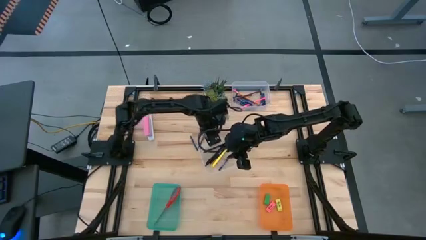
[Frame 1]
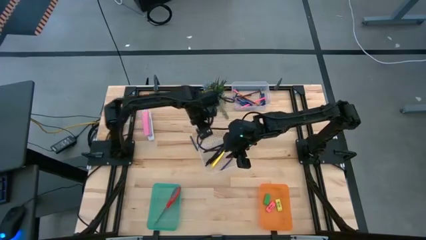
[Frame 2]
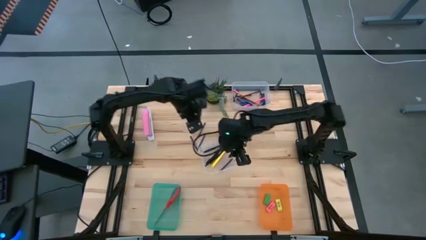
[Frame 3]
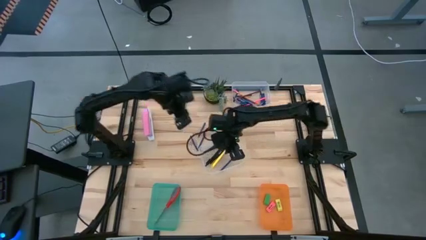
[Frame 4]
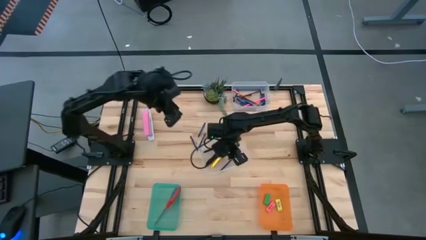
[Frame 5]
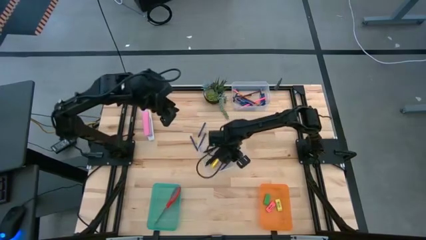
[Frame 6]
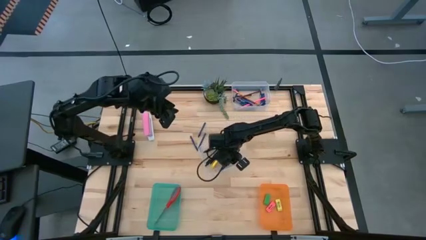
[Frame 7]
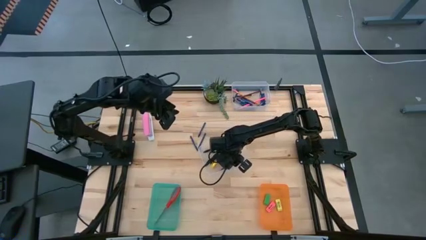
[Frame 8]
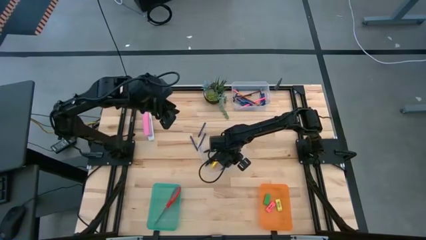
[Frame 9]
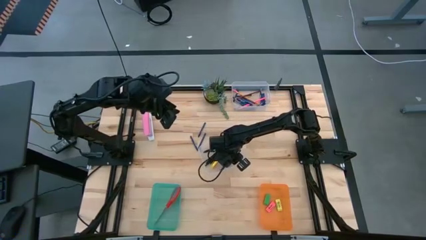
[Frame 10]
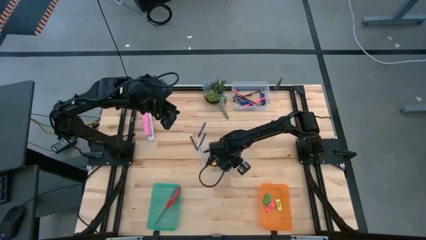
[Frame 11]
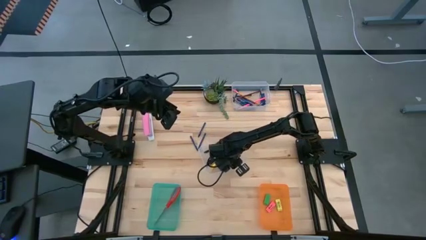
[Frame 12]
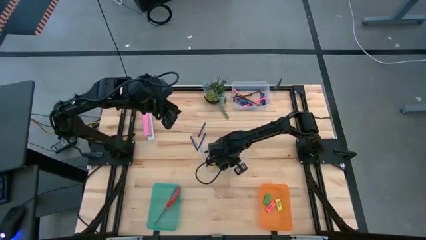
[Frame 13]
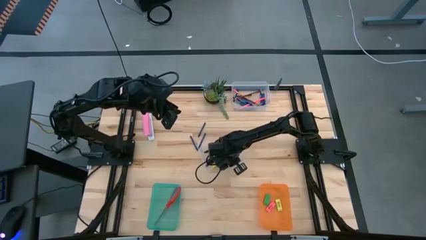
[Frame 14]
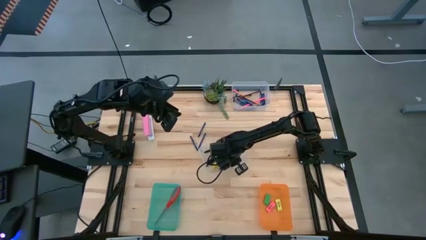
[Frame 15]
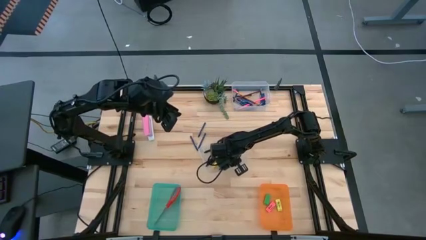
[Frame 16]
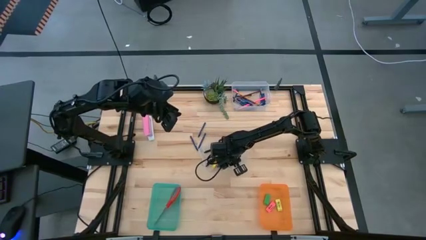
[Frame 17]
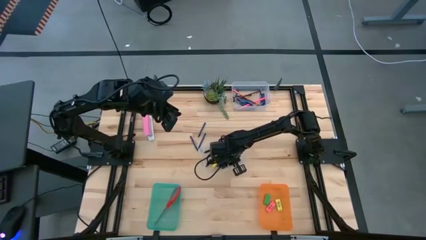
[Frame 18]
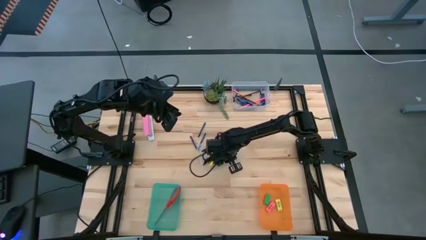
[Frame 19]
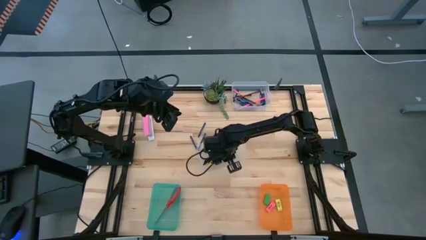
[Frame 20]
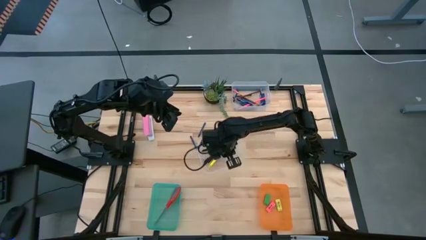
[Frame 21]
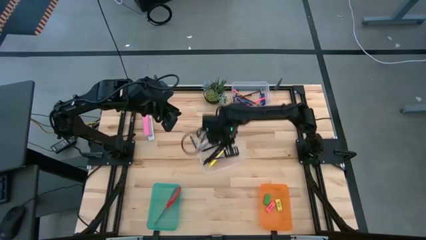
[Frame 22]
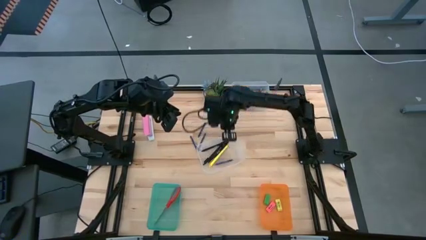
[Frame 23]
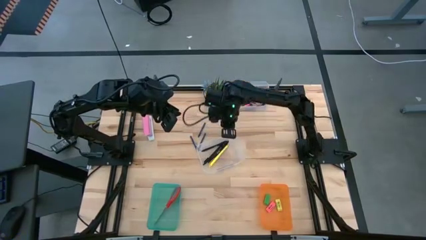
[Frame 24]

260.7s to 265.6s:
Task: Sort crayons/erasers/pens/pencils in bins
Put the blue crayon into the right transparent bin

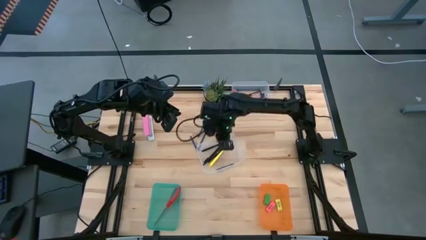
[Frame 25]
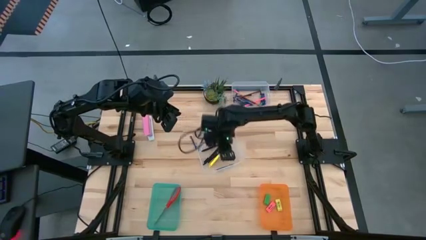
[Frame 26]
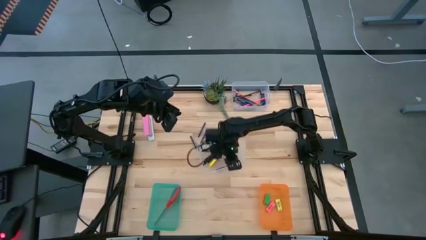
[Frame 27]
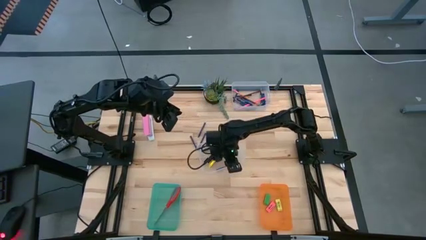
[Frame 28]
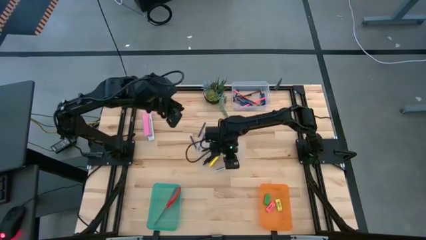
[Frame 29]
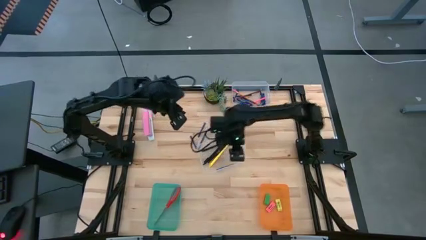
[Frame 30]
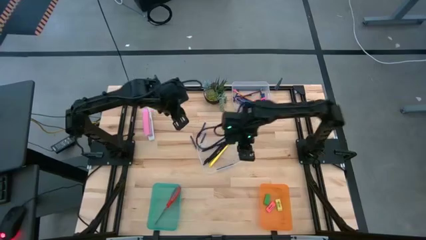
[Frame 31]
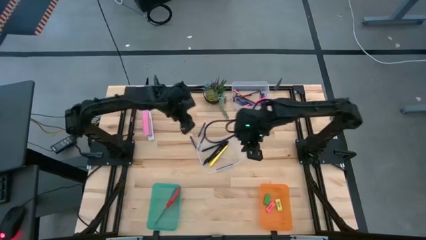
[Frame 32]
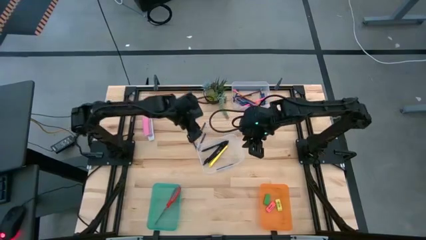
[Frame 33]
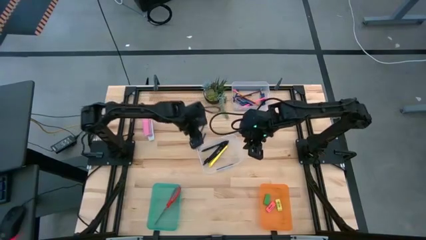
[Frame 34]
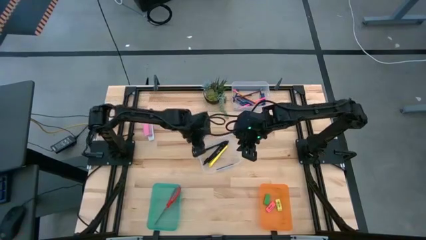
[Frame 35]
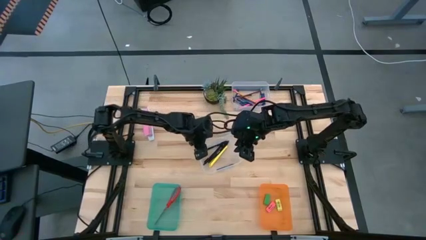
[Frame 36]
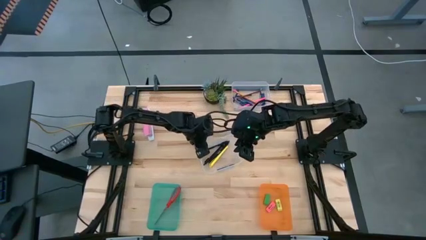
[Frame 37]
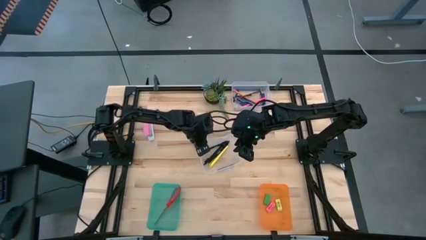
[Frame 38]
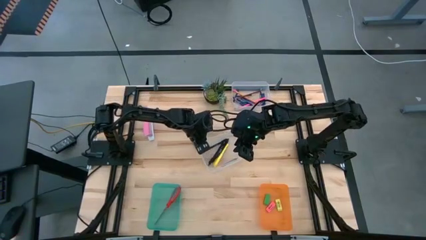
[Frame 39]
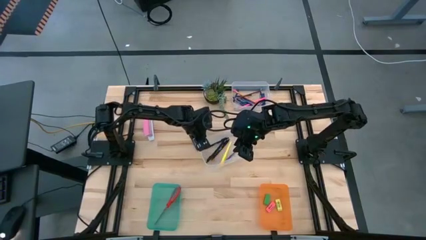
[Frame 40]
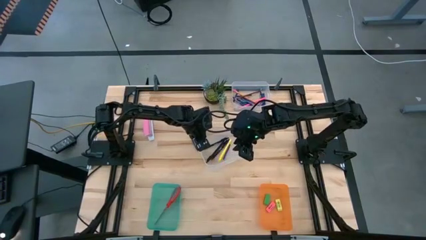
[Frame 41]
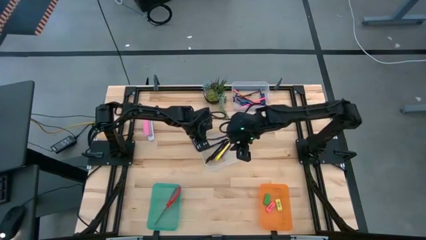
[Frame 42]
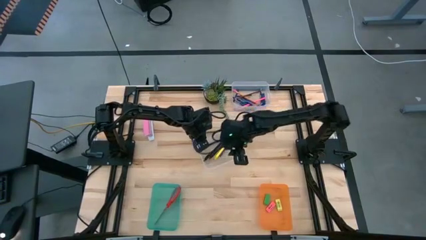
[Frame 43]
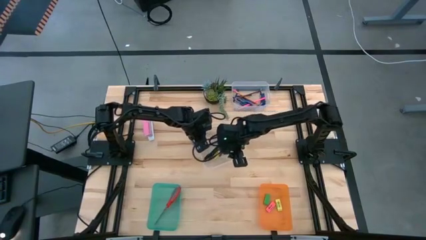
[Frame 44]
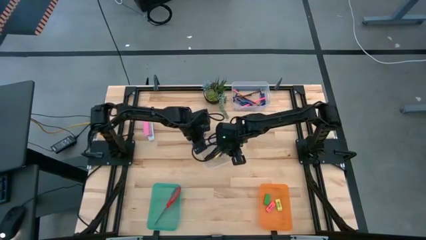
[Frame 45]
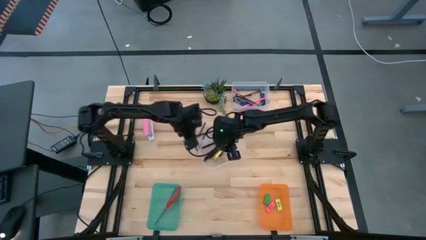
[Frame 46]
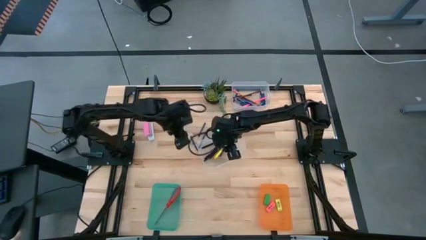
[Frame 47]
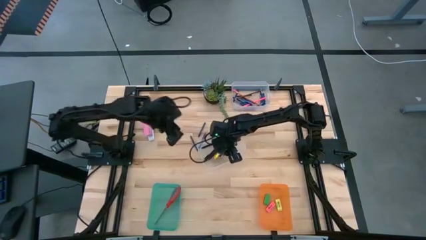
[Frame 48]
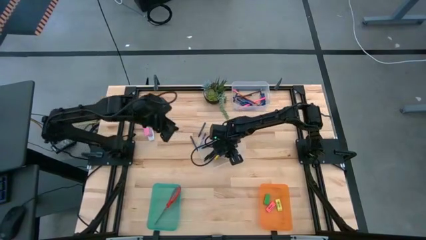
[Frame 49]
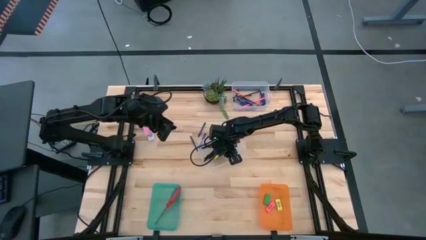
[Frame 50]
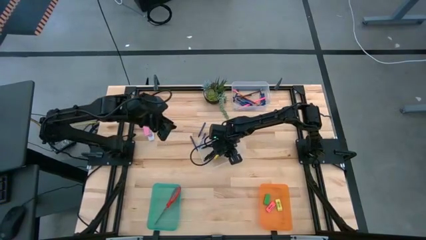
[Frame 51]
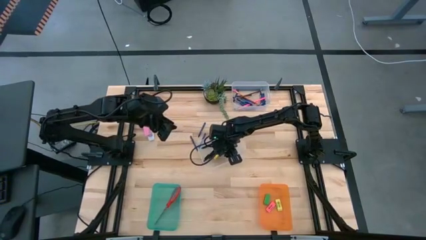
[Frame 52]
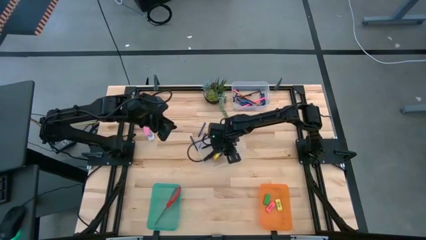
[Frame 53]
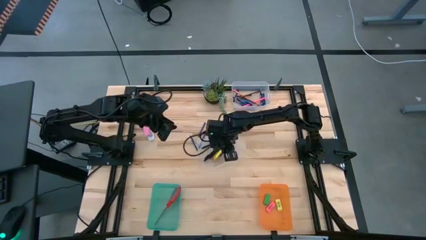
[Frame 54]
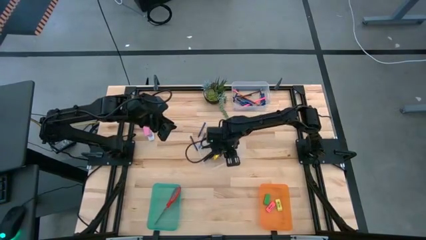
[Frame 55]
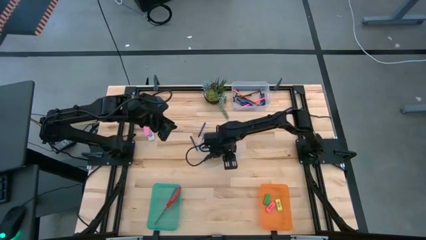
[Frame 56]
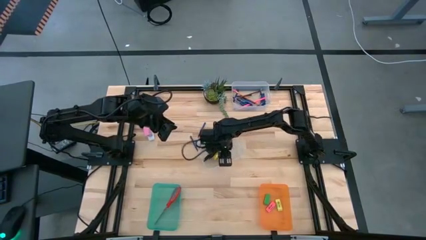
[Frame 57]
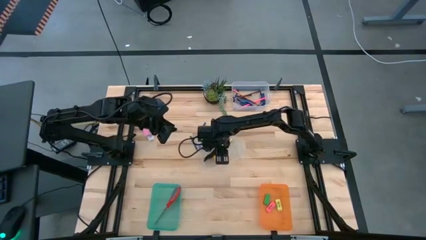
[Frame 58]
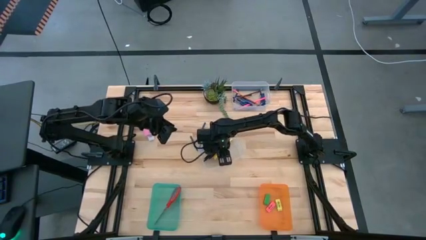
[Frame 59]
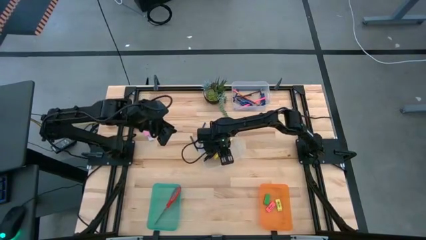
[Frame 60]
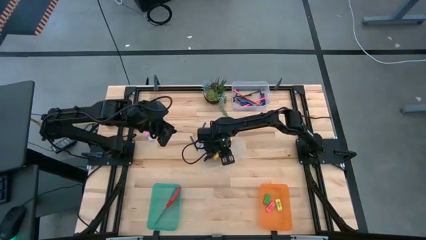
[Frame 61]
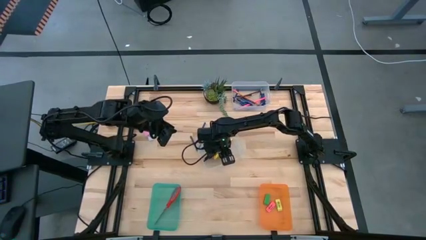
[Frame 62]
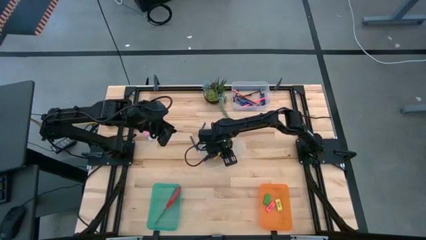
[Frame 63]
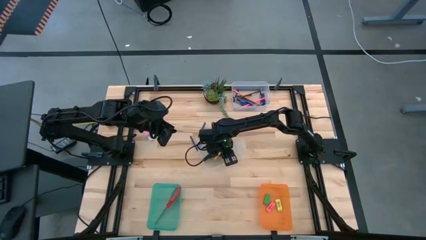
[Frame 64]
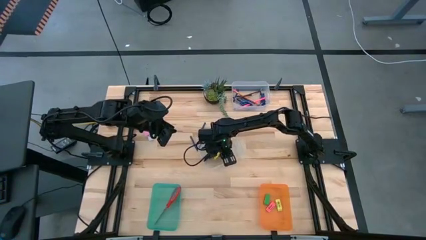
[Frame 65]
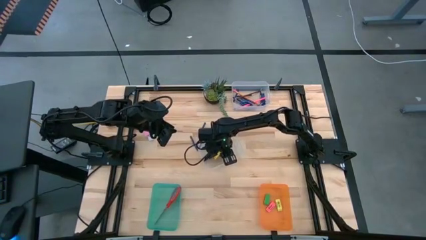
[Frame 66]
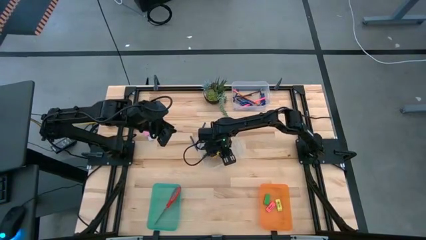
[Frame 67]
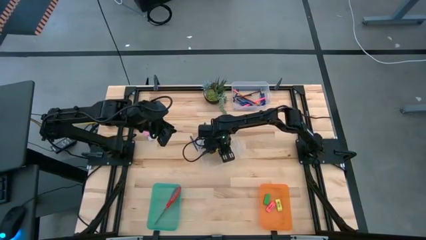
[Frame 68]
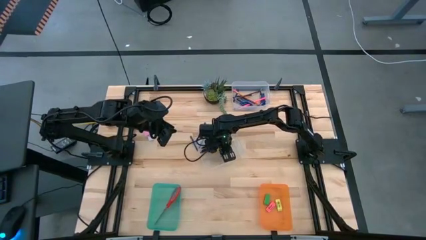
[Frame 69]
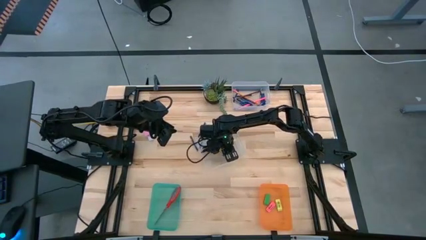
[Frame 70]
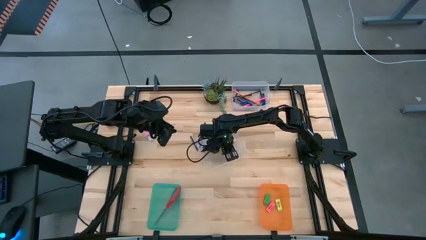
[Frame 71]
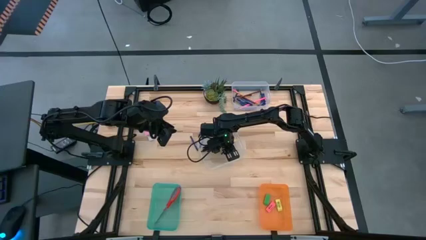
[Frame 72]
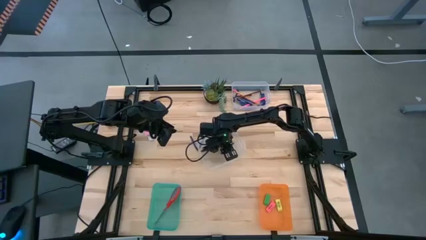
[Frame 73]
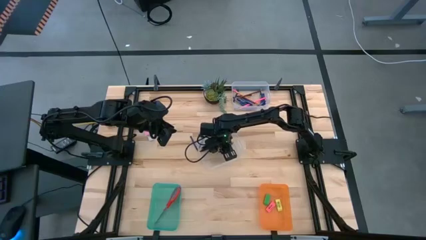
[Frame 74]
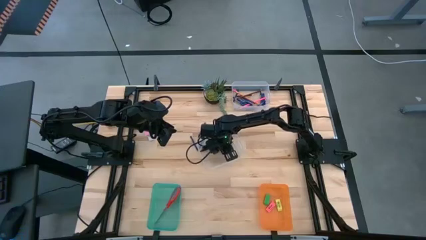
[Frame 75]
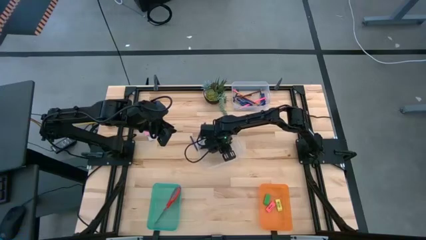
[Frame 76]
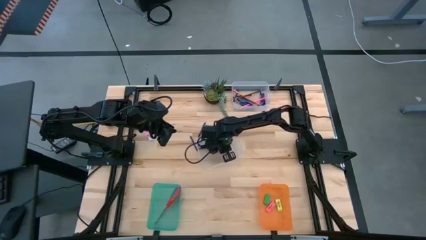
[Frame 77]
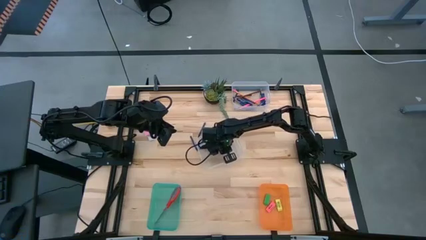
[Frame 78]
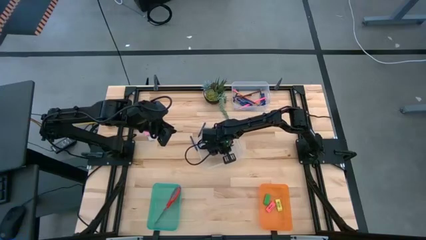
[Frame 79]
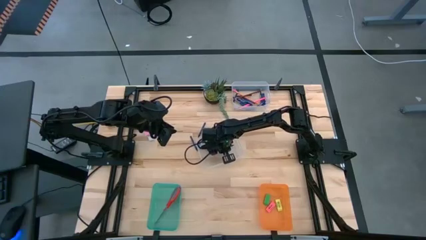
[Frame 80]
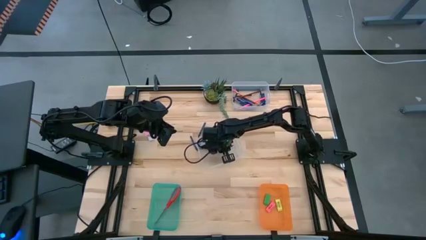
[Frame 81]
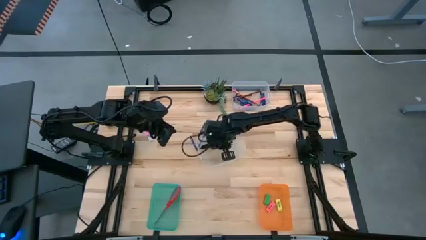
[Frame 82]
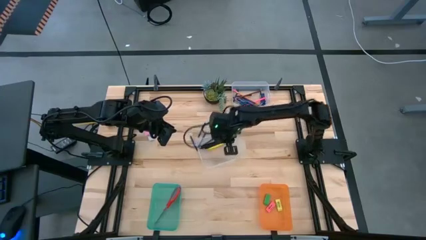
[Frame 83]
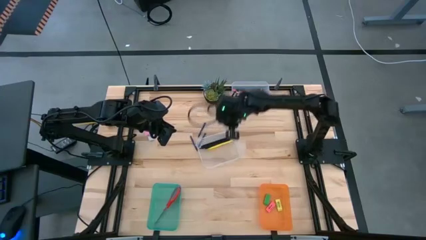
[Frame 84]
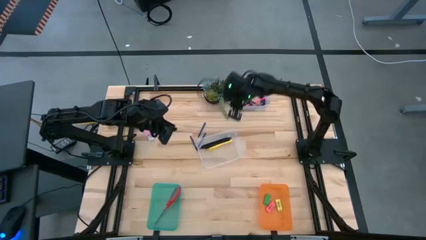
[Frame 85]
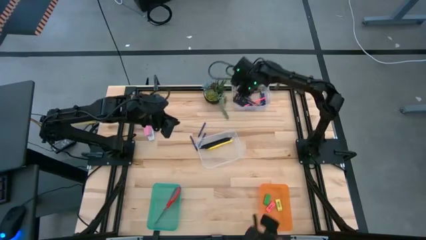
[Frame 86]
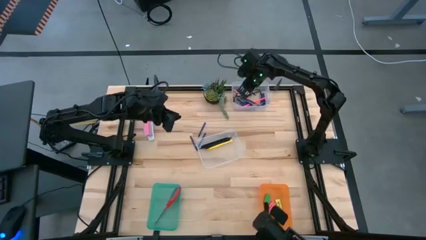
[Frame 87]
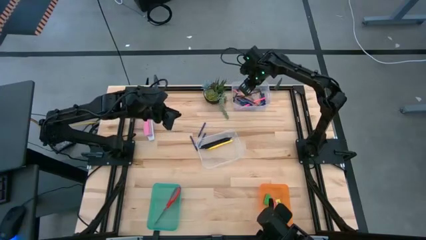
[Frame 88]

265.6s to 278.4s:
Put the blue crayon into the right transparent bin
